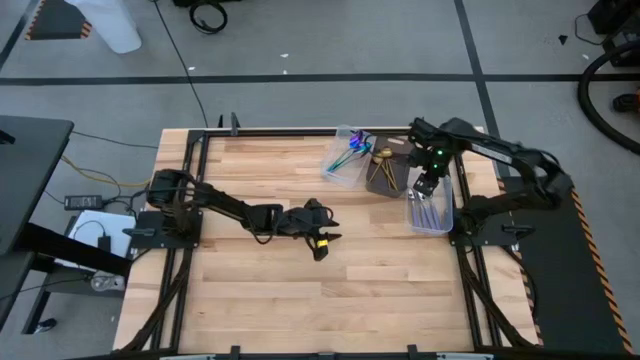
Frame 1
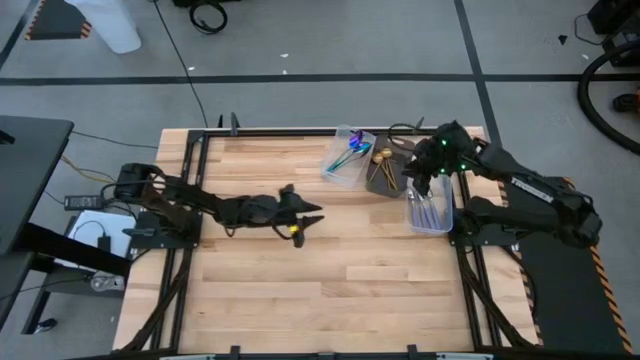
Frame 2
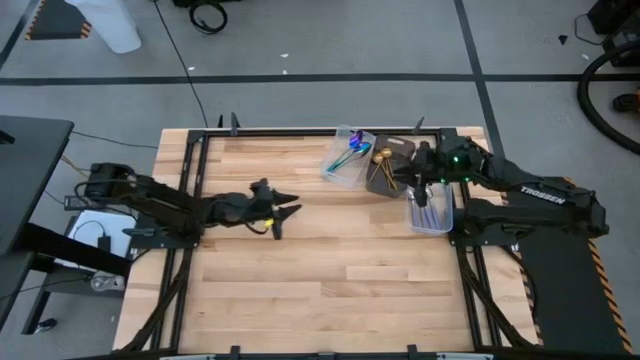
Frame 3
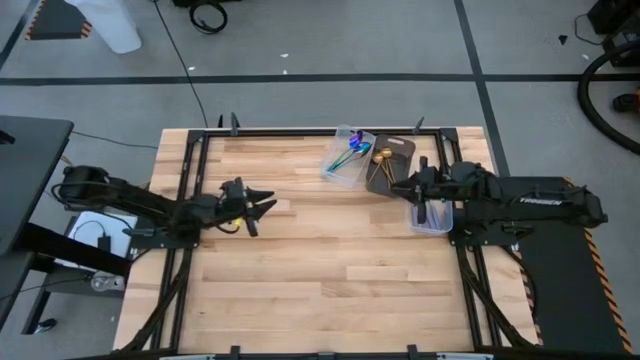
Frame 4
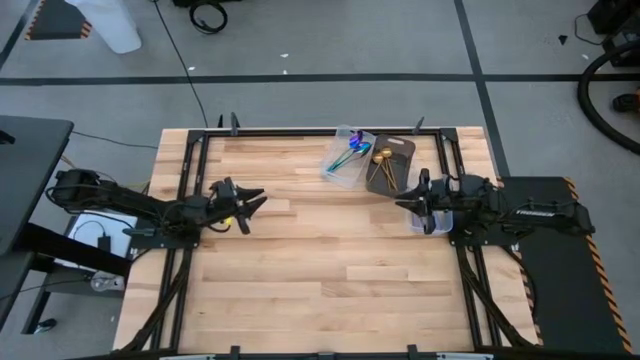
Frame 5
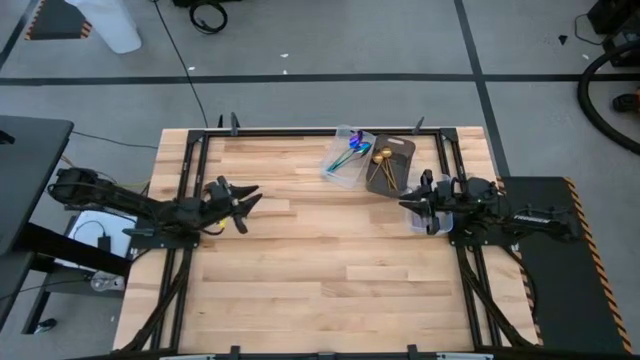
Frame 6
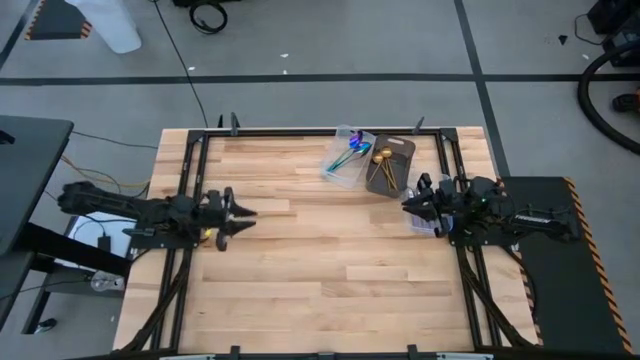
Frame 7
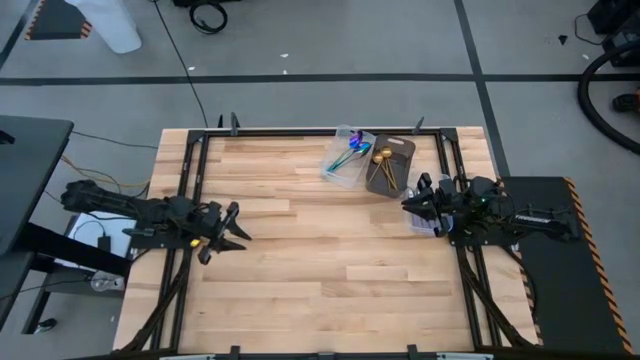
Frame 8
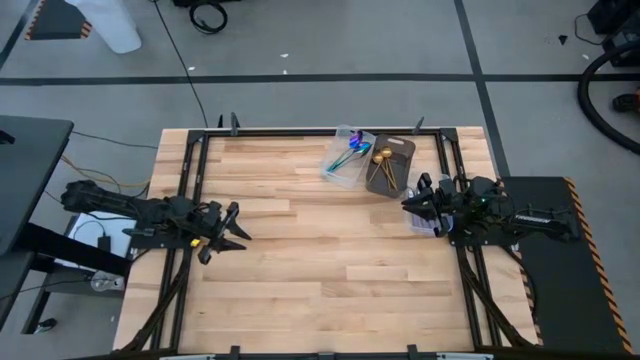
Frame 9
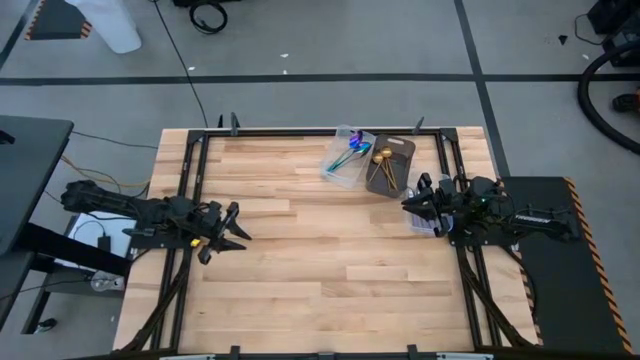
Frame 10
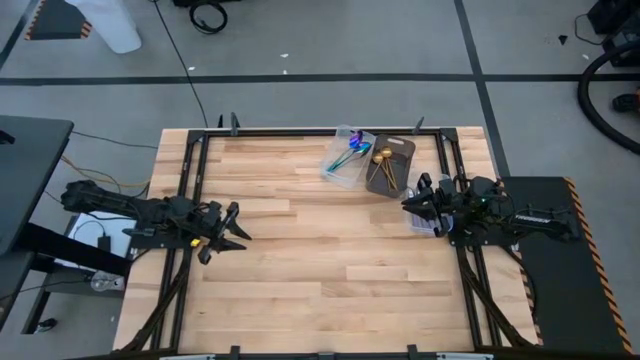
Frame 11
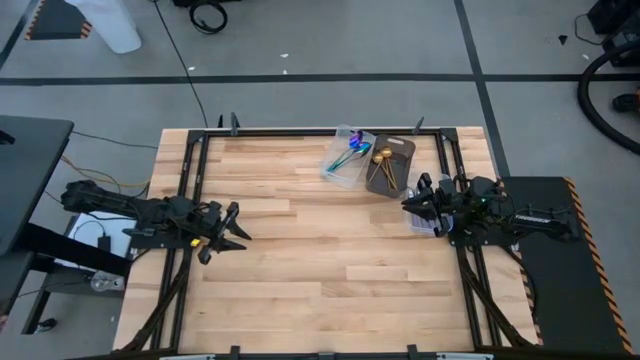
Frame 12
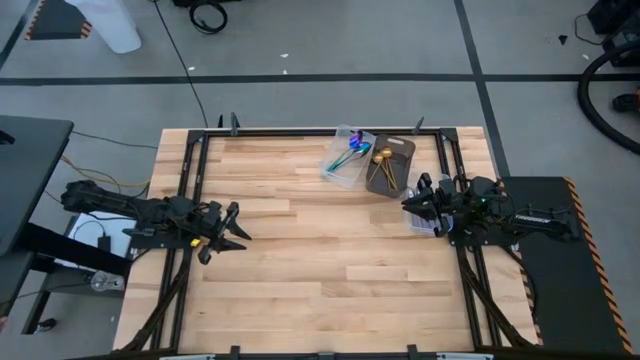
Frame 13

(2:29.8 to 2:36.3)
Task: Sort silverware by color (type)
Return to Home Position

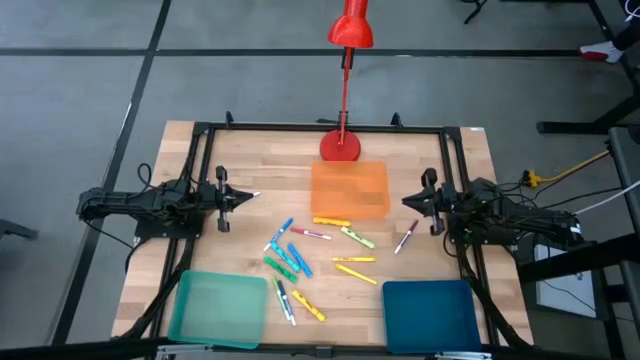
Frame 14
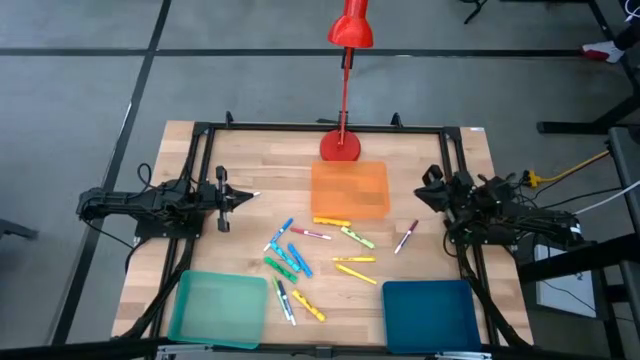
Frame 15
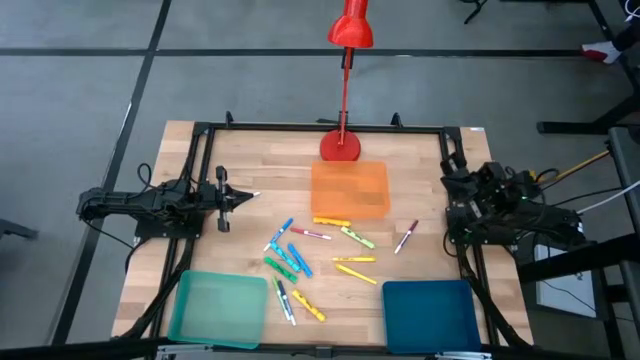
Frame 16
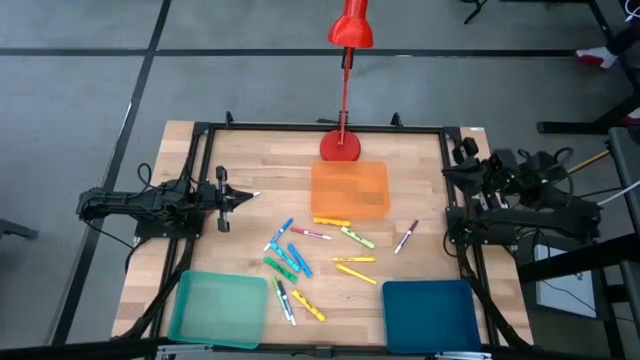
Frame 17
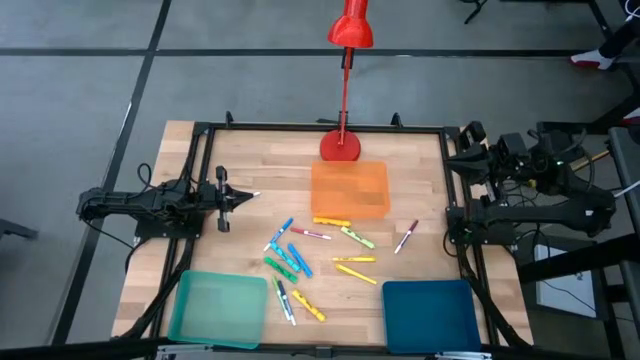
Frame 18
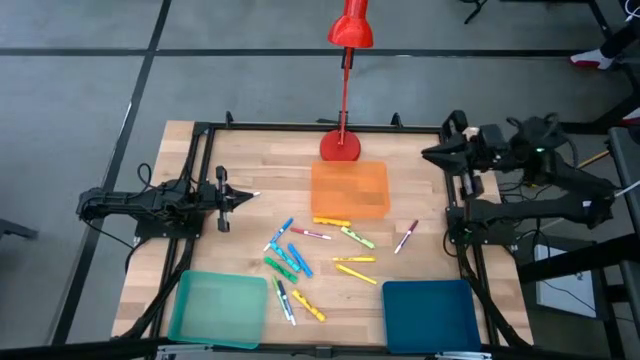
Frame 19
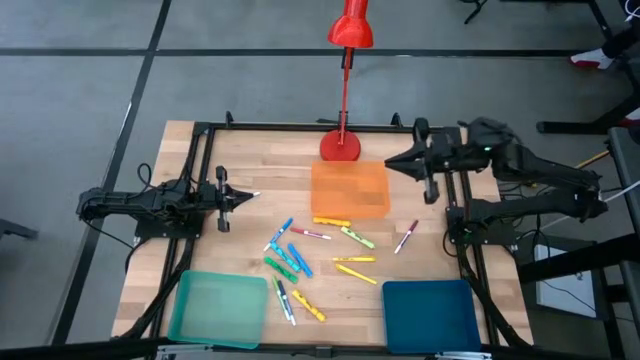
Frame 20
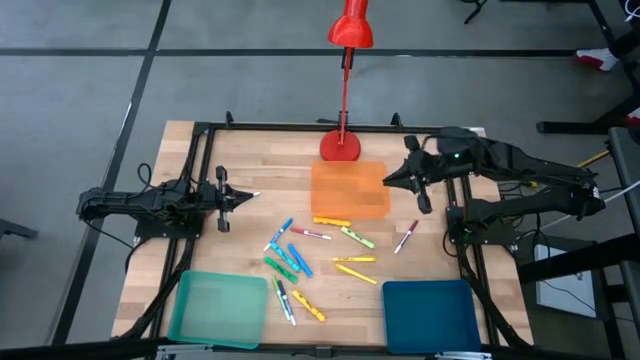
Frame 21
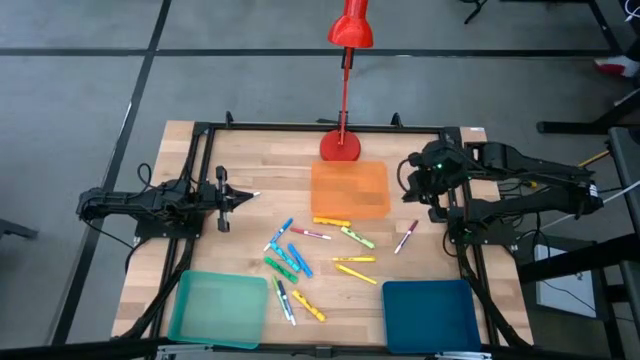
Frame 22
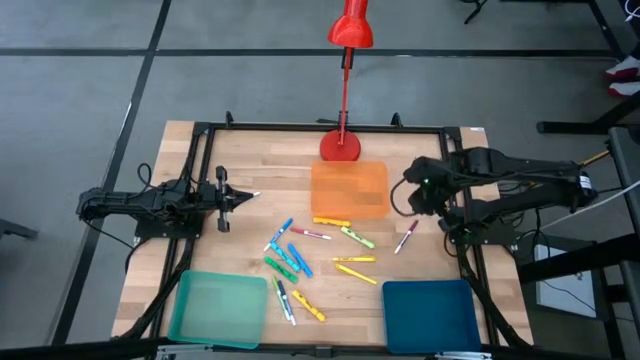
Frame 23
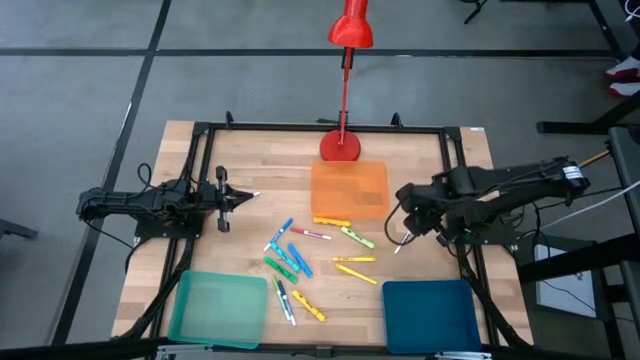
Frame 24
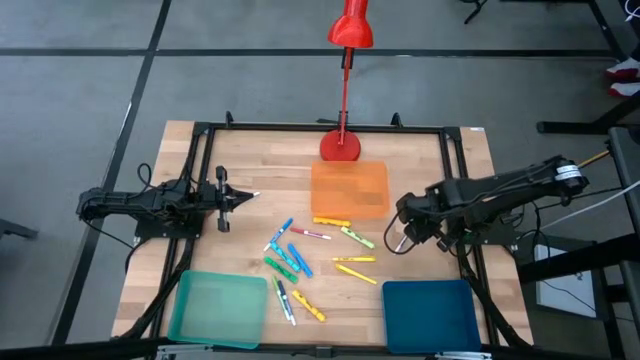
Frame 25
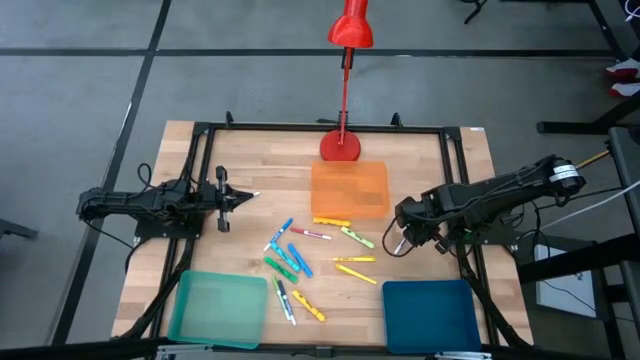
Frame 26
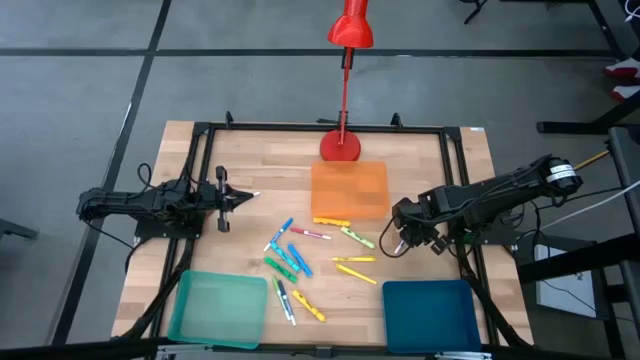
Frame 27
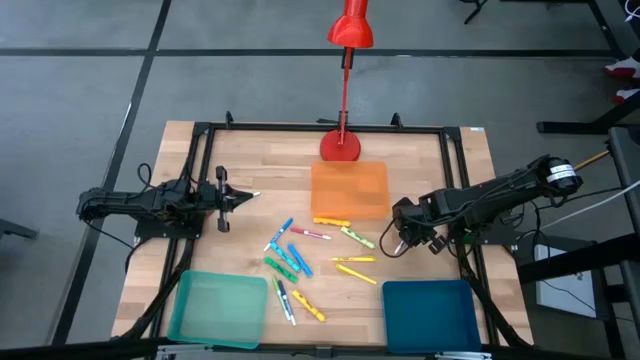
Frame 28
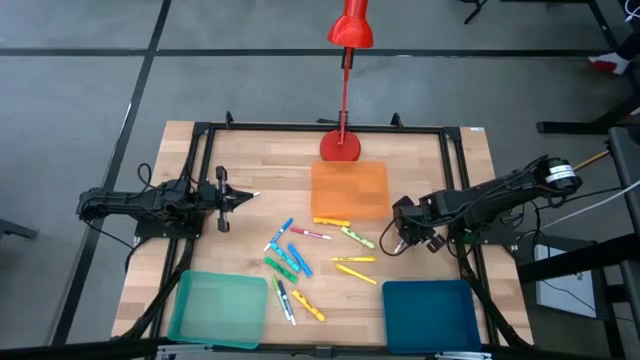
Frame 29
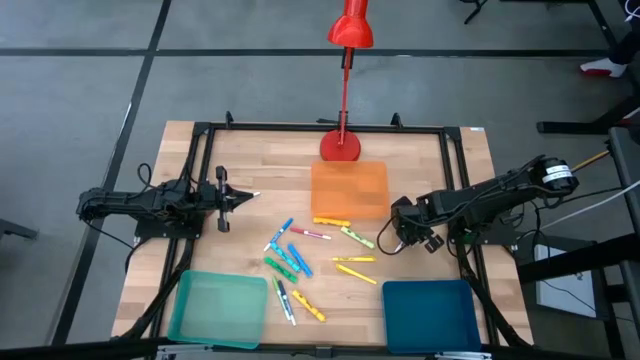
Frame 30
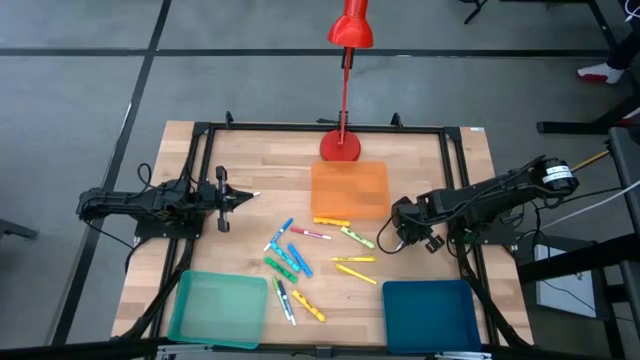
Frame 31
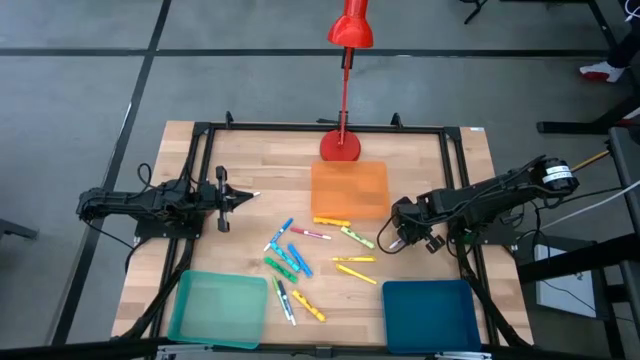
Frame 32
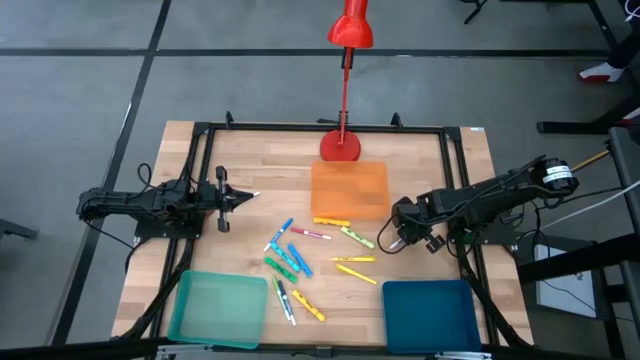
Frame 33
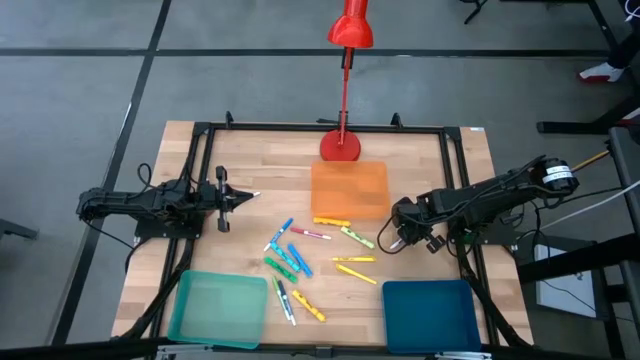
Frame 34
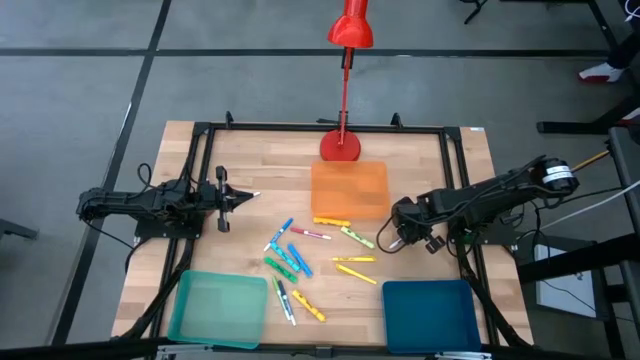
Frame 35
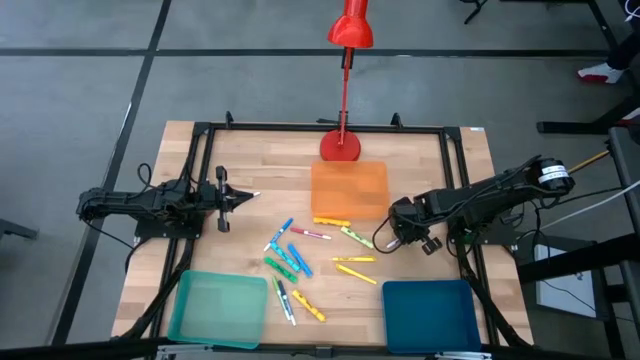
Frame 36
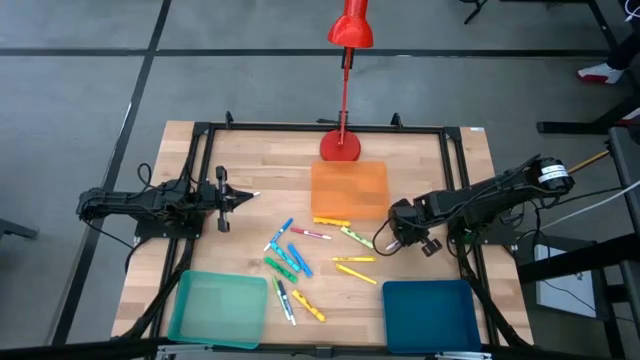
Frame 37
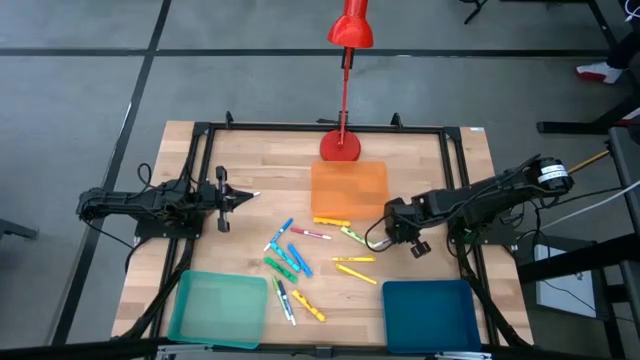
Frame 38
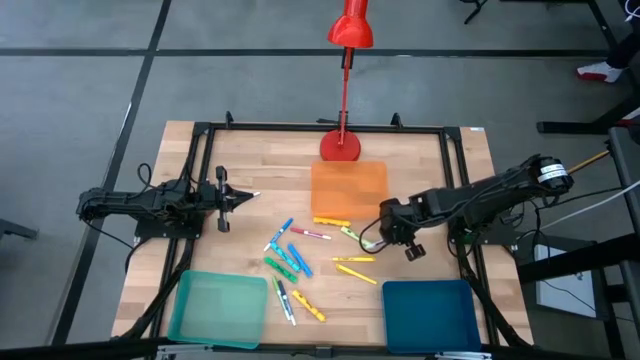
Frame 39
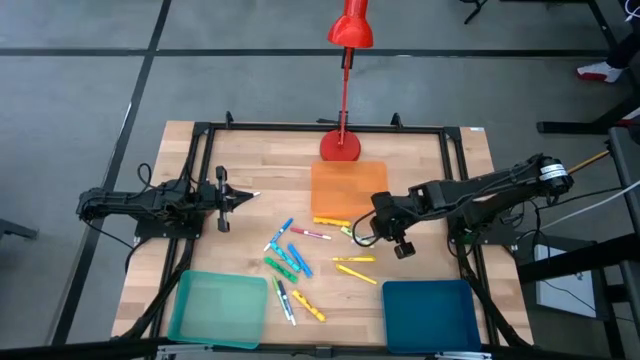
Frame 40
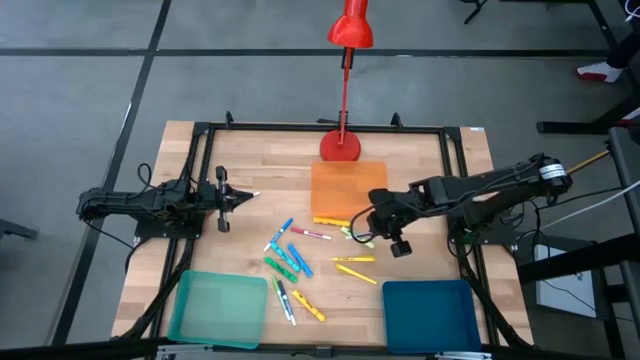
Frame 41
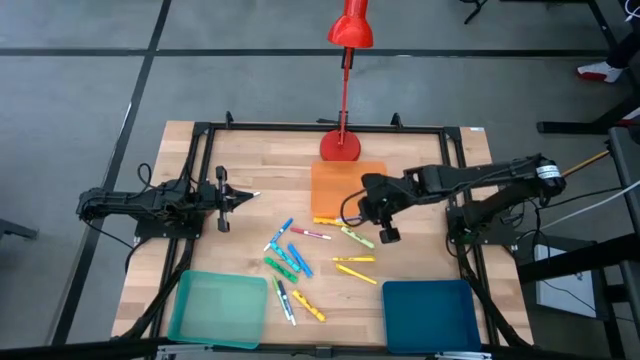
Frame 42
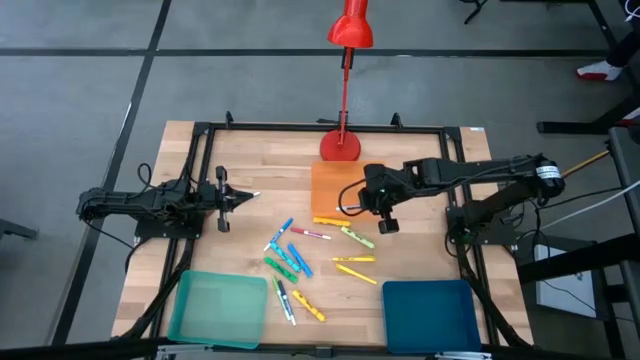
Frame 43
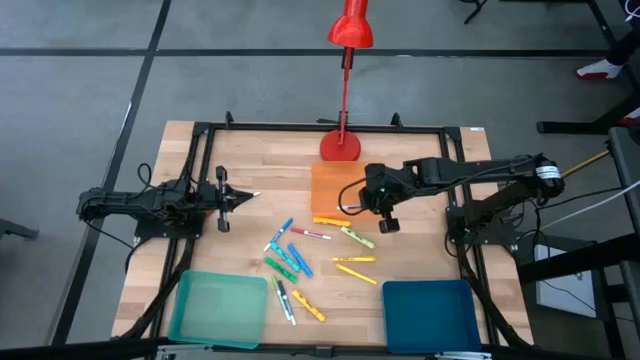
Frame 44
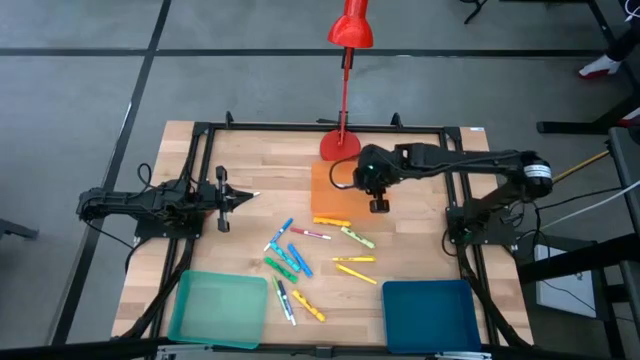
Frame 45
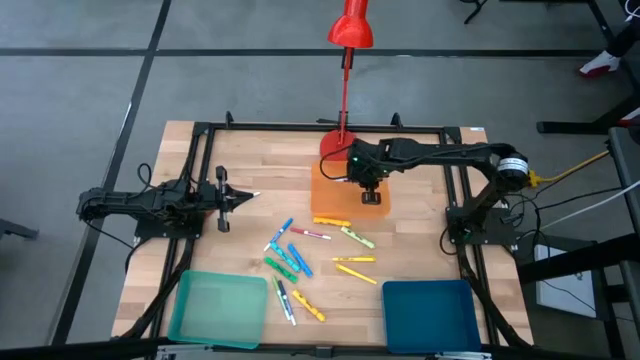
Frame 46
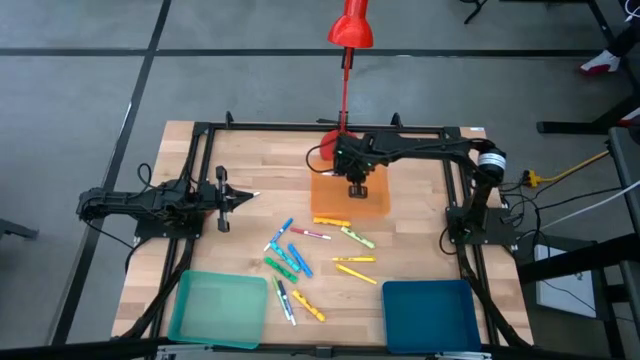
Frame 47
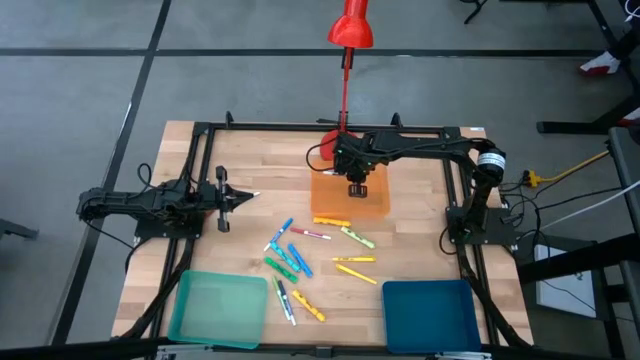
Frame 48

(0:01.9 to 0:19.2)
Task: Pick & Place Markers
Put the red marker pen into the orange bin
